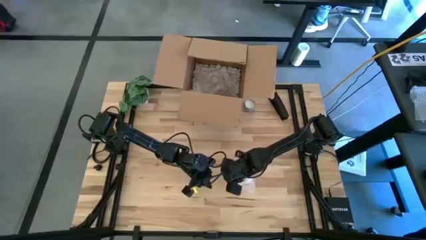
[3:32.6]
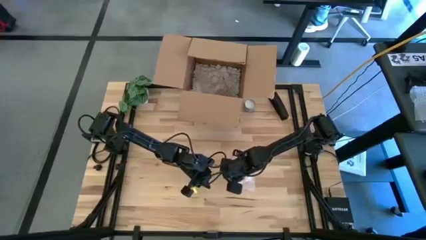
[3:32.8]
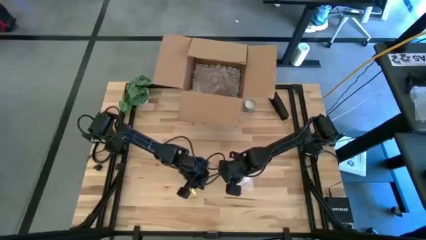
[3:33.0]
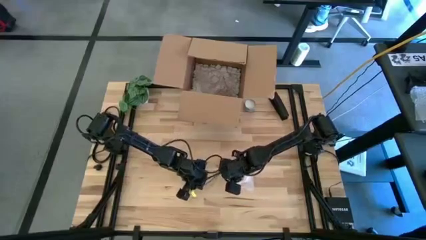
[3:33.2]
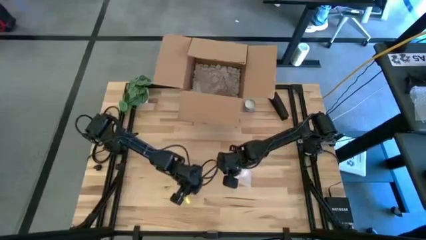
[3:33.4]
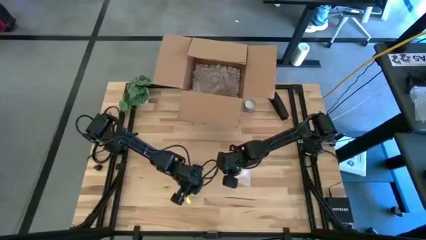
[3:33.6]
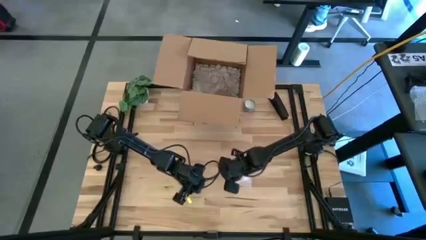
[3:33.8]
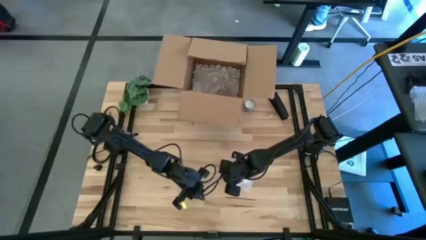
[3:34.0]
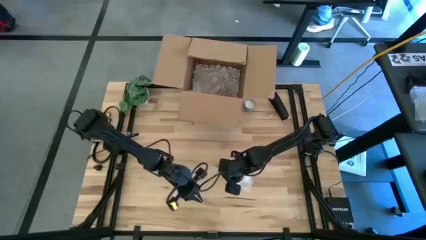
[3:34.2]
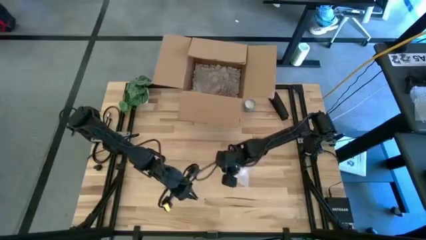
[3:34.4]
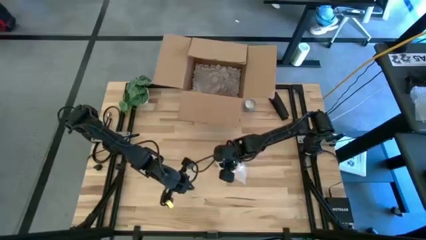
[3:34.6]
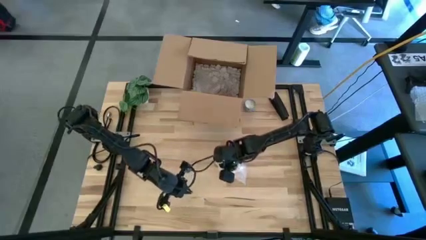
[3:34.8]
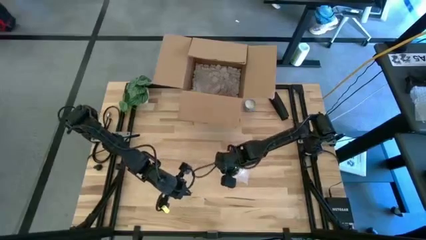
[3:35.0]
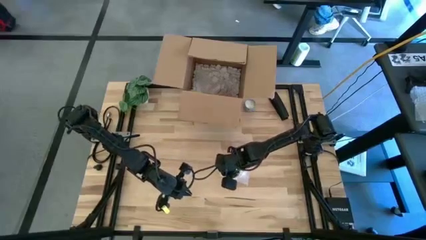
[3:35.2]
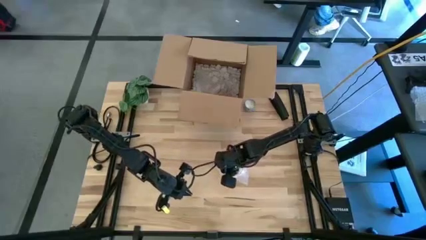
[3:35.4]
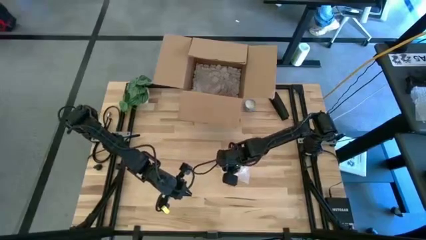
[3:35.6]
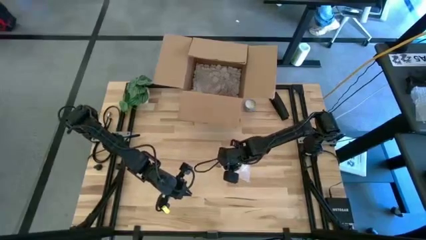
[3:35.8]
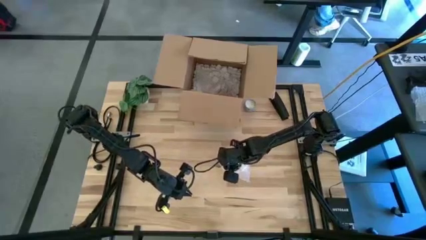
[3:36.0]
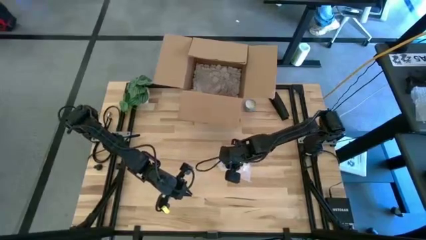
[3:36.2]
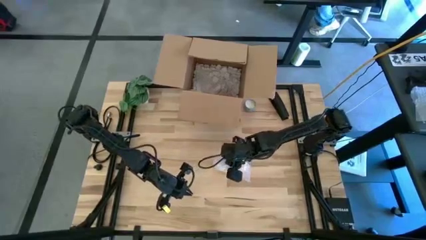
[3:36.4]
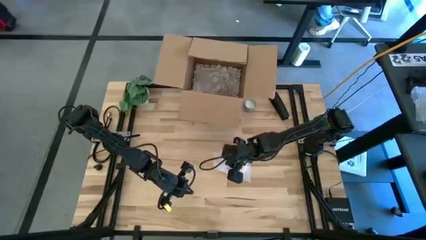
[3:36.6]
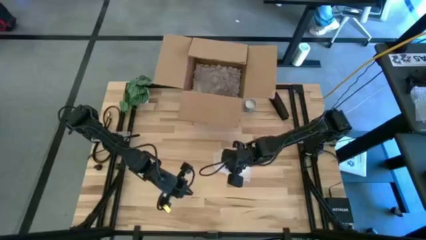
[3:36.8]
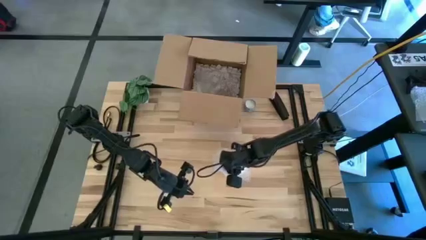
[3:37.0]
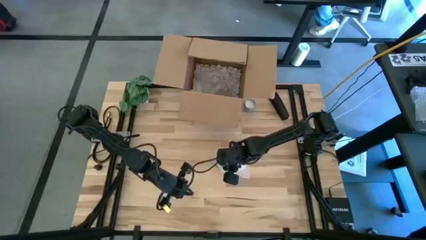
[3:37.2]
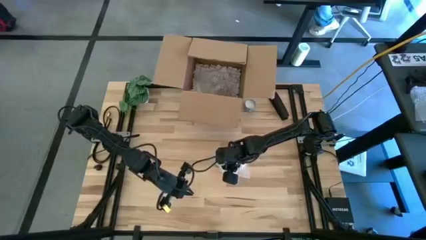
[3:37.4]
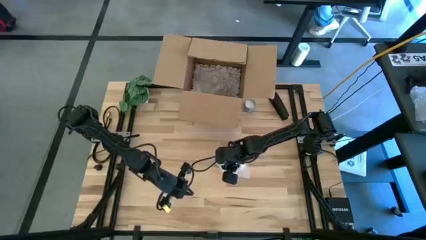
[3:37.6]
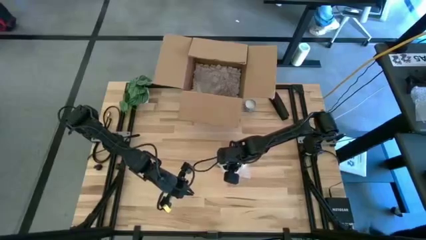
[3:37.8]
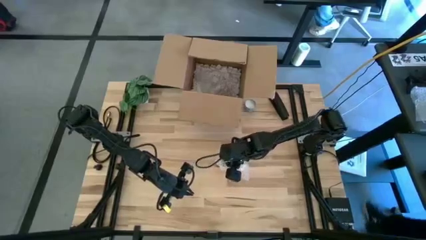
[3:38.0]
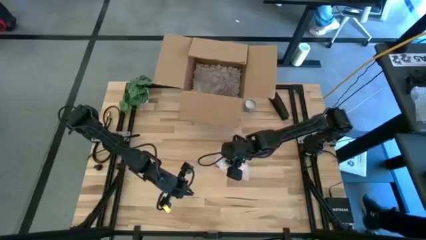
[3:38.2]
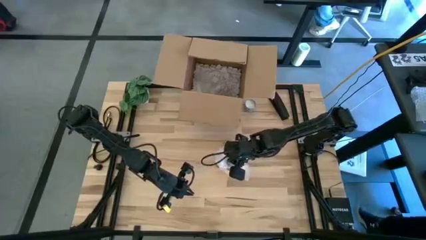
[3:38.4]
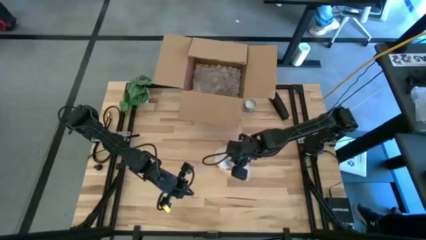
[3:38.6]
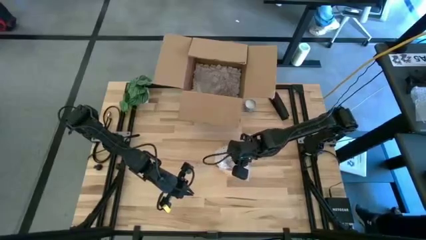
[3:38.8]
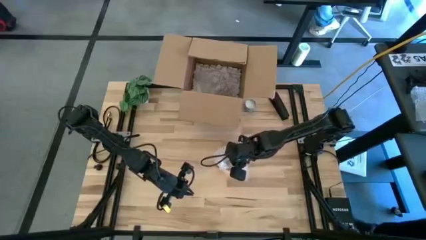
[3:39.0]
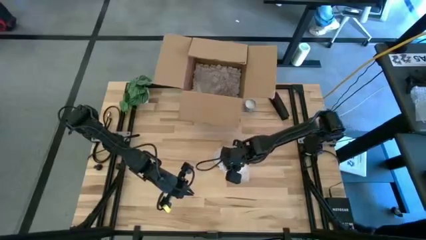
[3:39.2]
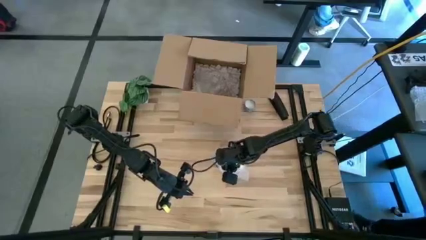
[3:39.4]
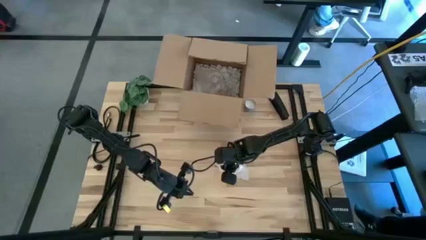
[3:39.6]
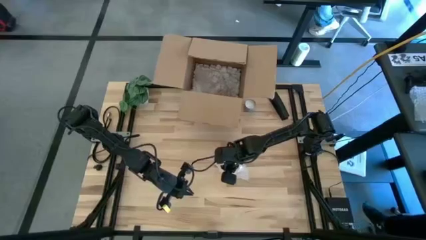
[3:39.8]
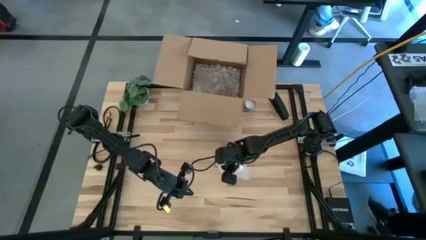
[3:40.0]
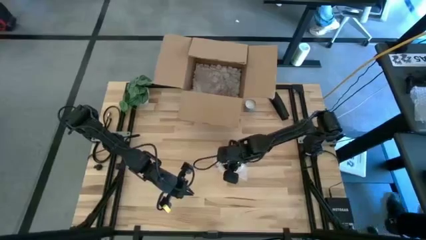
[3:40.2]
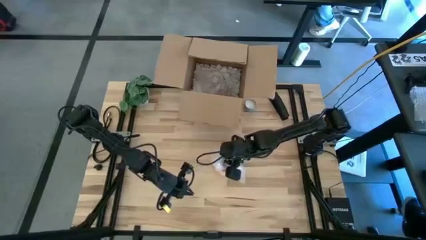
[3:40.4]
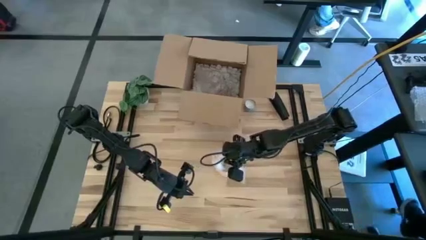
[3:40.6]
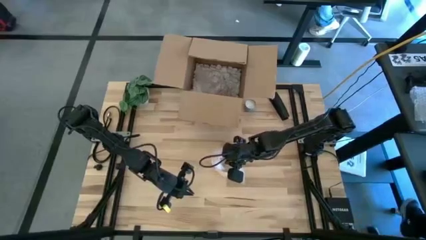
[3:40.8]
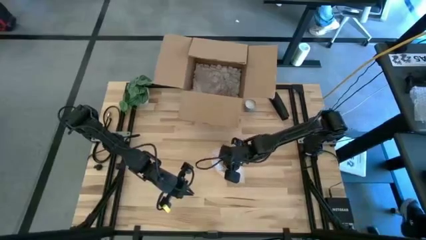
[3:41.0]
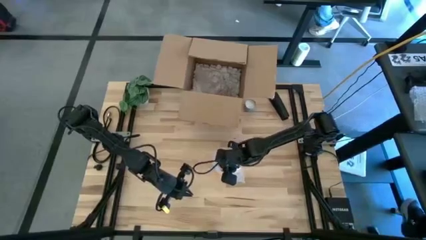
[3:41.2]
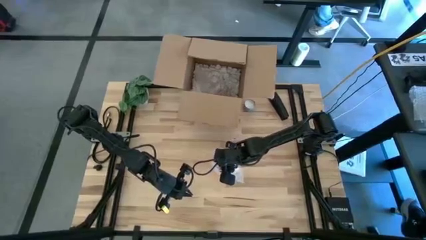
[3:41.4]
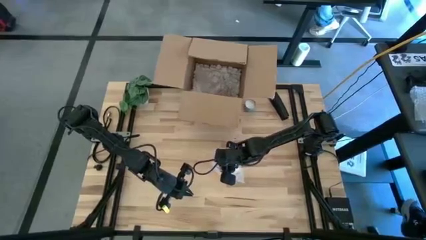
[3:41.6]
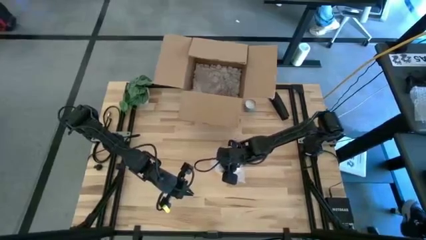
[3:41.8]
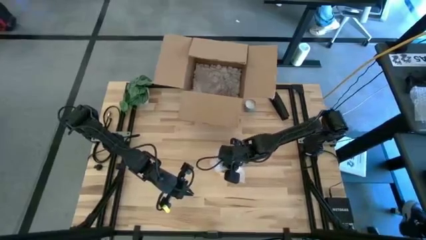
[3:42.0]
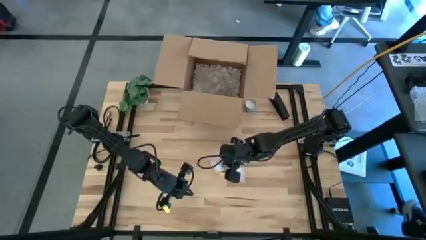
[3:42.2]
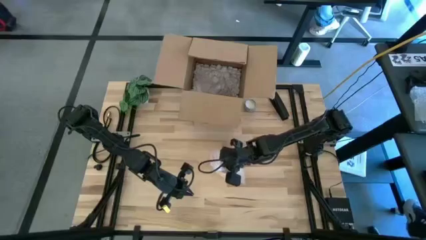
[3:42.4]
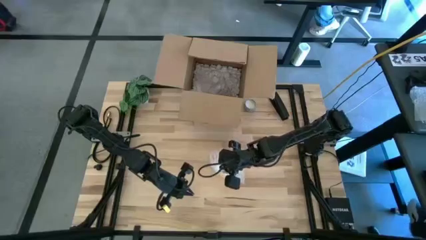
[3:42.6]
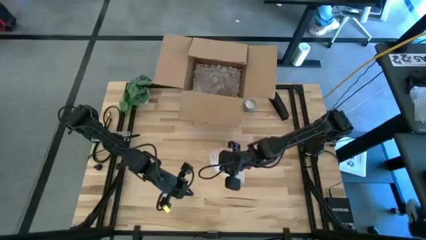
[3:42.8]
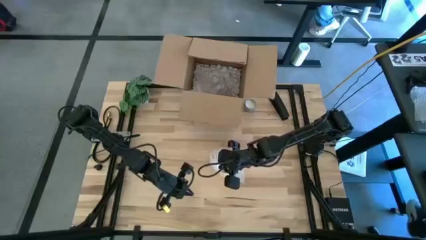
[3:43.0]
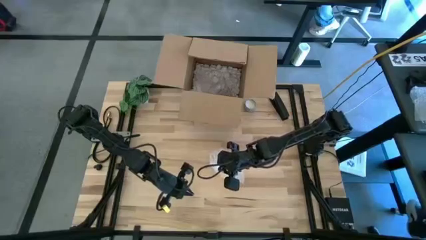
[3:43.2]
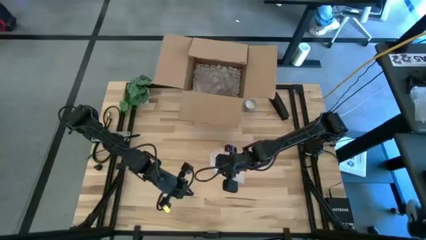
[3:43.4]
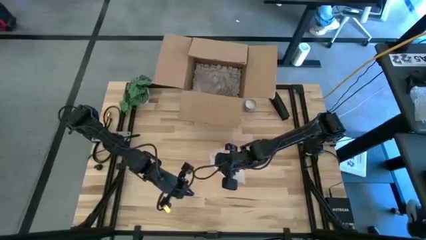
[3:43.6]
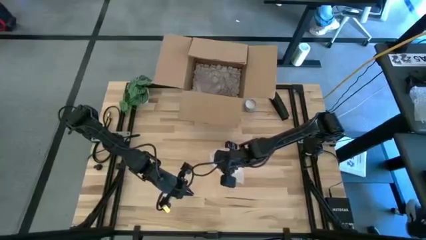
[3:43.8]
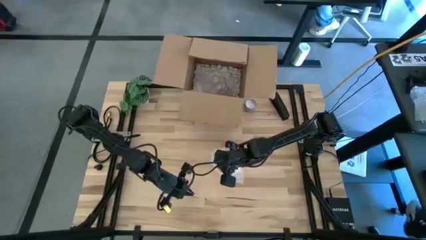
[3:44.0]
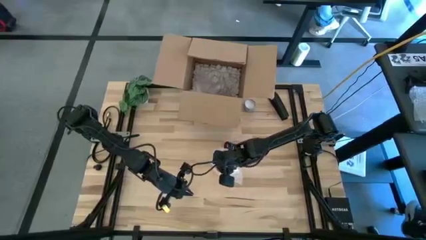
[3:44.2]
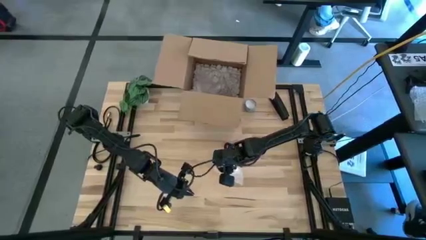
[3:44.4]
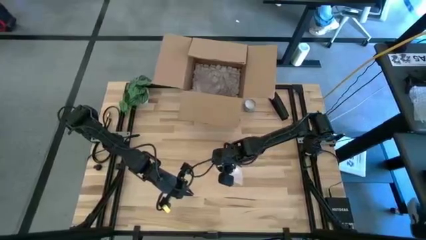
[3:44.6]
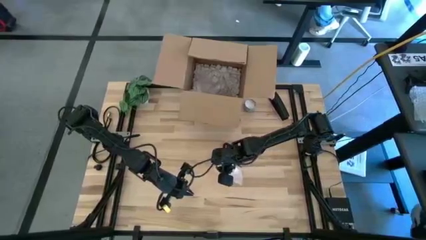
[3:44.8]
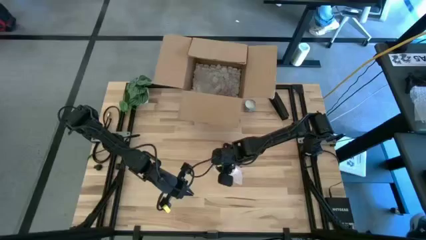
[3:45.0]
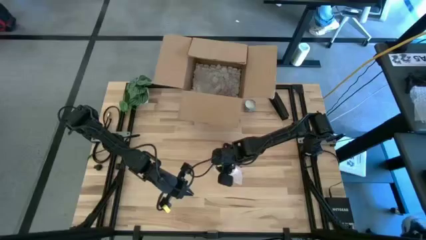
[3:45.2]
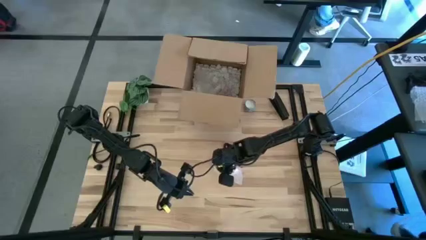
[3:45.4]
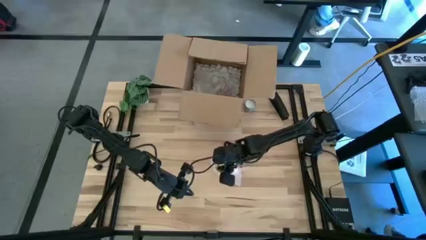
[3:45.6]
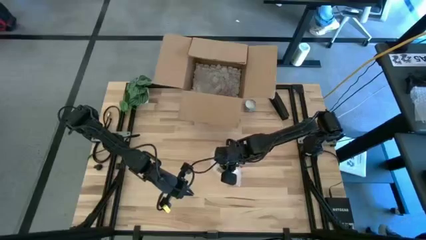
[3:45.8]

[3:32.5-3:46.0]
Task: wrap mug
Wrap the yellow mug with the bubble wrap

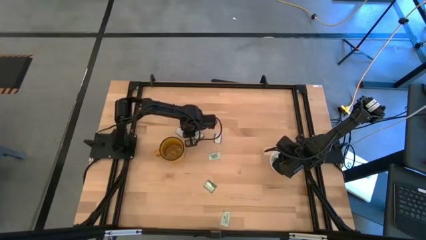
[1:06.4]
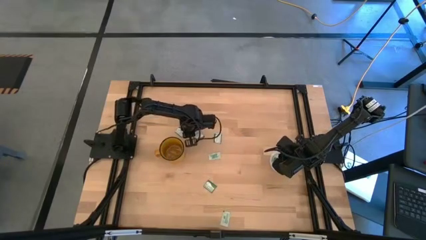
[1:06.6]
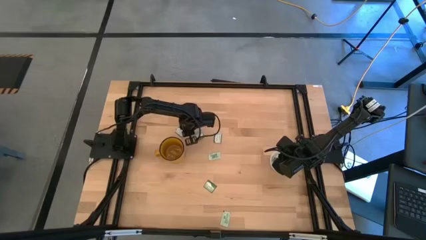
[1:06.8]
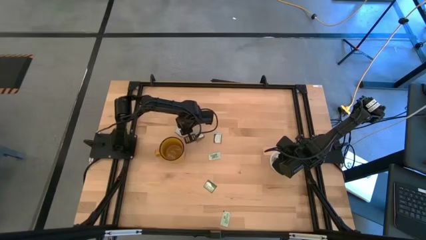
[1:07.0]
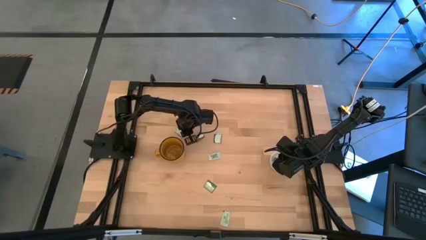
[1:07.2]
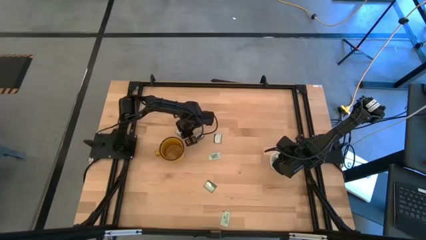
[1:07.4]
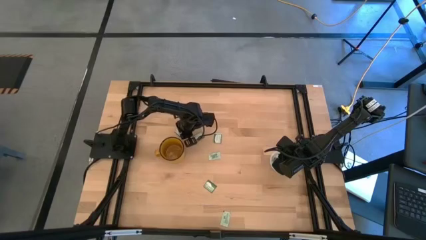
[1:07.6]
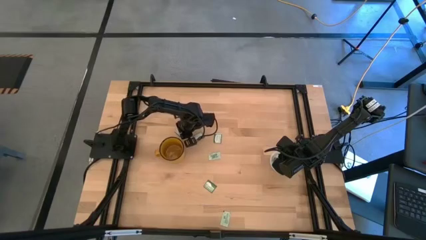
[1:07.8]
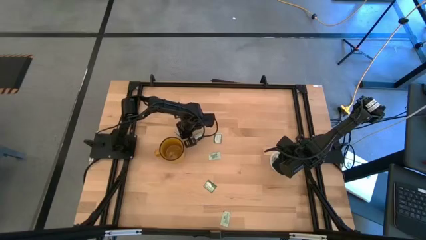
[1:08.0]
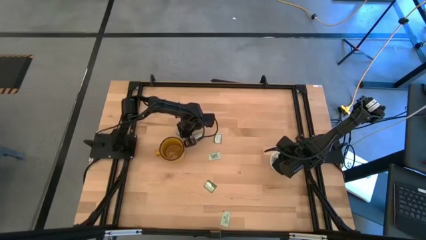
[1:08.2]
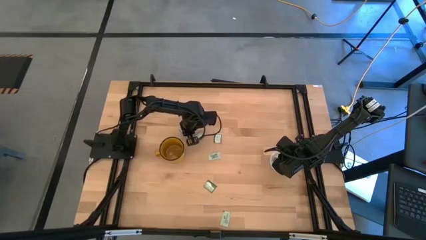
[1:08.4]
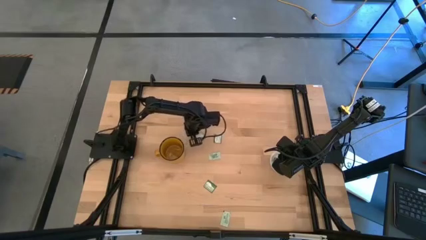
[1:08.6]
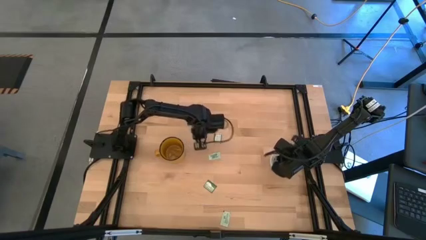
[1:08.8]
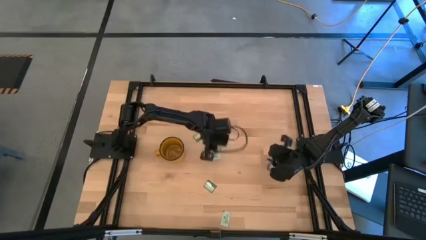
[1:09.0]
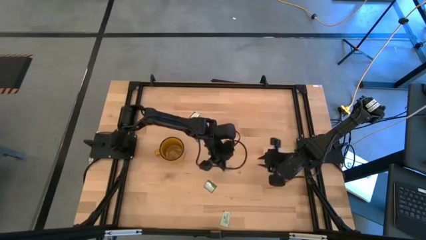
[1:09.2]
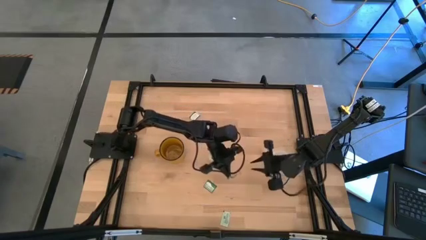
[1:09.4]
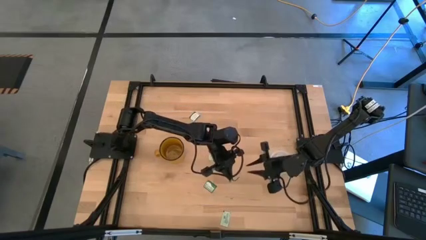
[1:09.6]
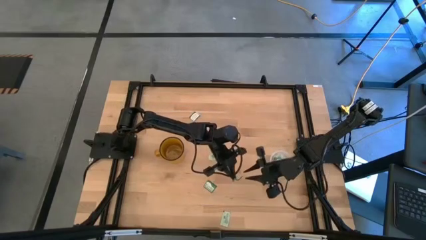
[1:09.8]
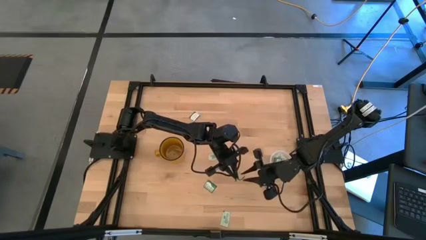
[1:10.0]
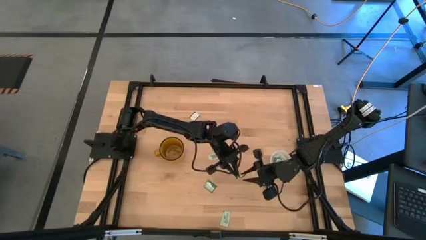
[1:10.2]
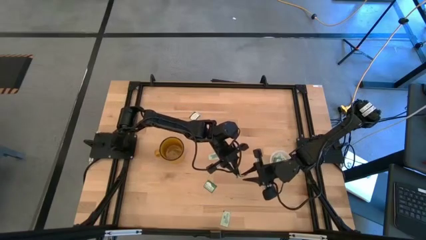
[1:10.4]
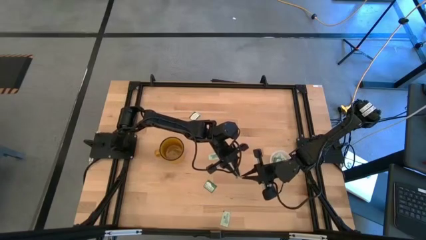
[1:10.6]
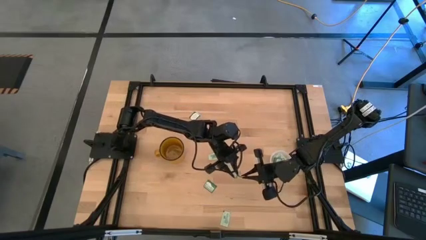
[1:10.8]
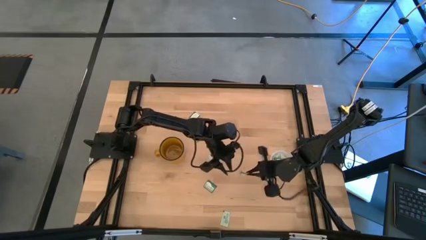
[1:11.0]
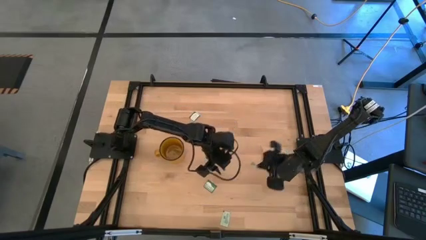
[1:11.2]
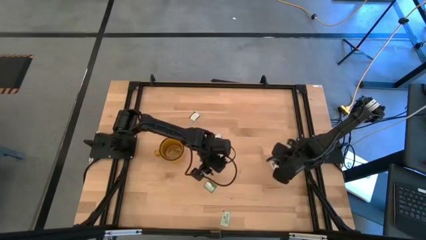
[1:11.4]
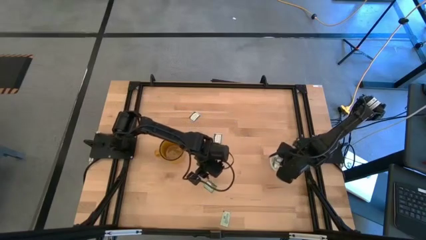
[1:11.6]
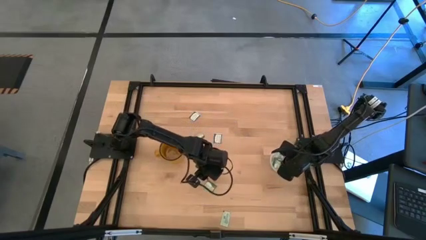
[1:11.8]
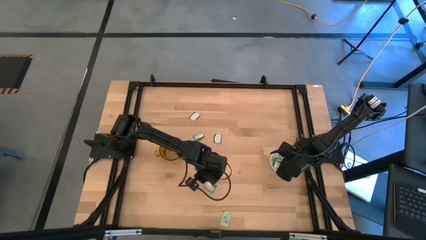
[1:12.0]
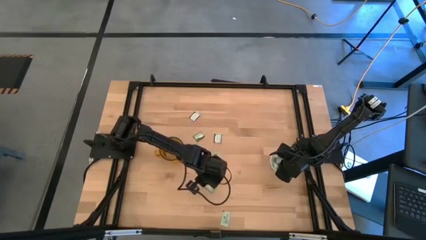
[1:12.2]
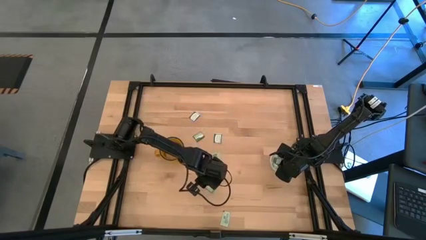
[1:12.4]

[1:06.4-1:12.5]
Task: Pick and place Stevia / Truvia into bins
Put the green stevia packet into the transparent container
